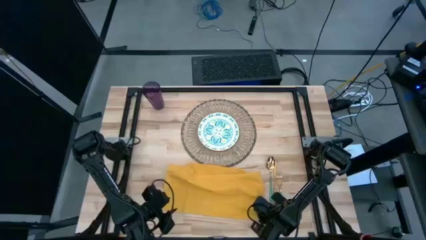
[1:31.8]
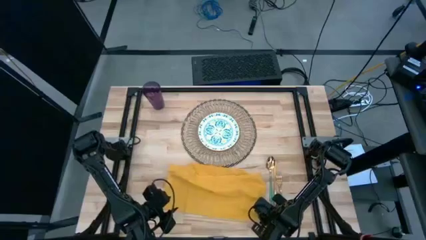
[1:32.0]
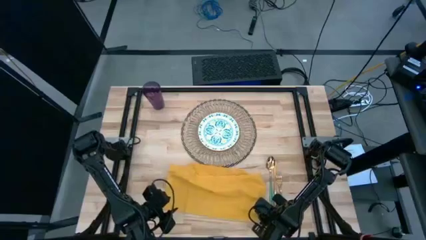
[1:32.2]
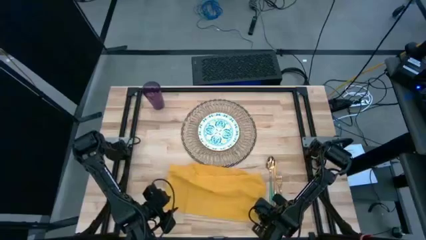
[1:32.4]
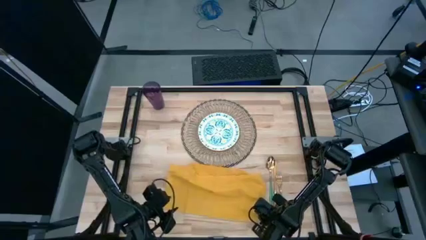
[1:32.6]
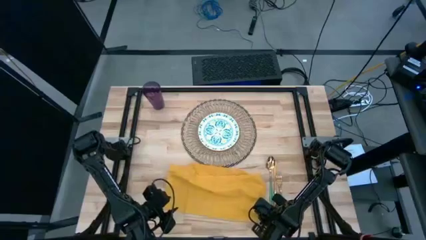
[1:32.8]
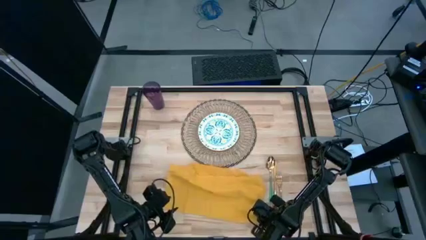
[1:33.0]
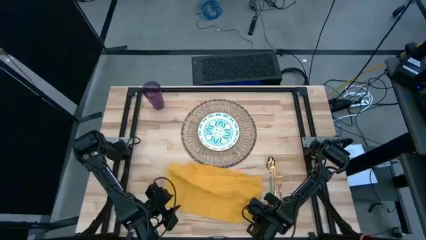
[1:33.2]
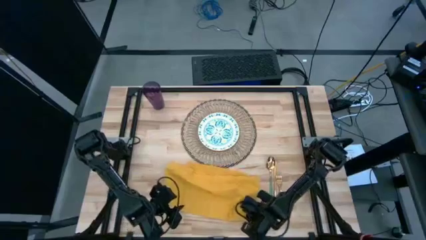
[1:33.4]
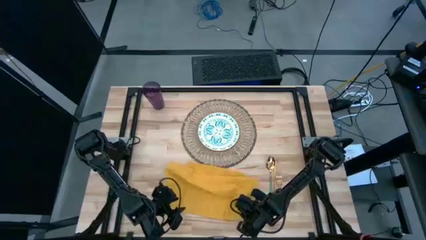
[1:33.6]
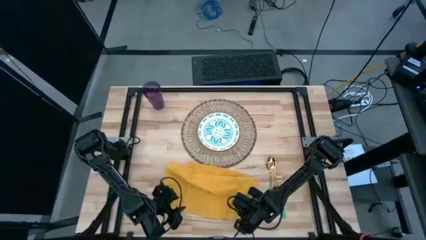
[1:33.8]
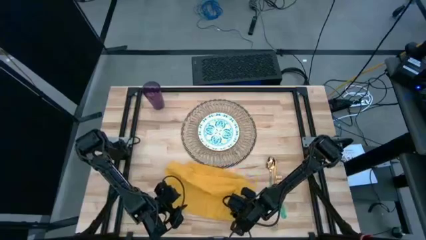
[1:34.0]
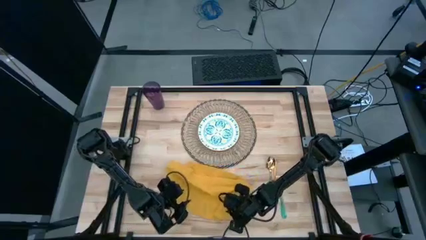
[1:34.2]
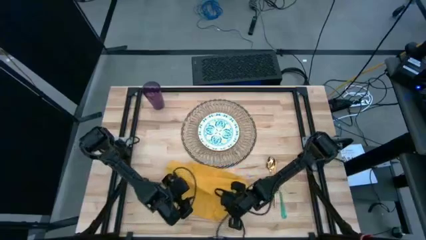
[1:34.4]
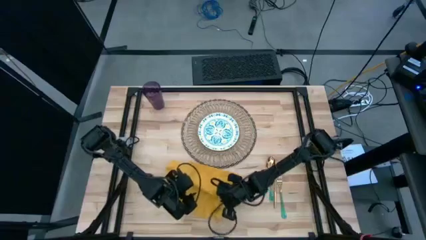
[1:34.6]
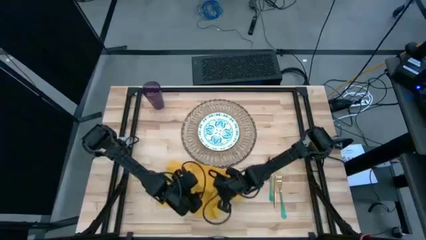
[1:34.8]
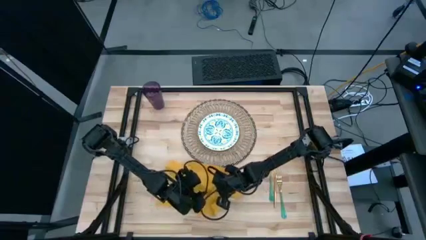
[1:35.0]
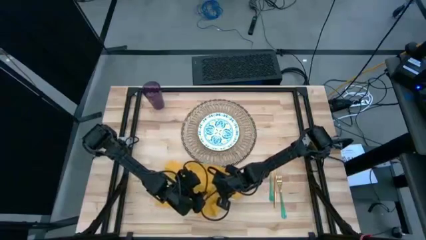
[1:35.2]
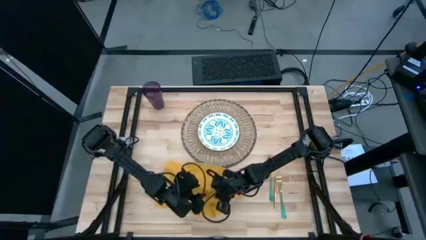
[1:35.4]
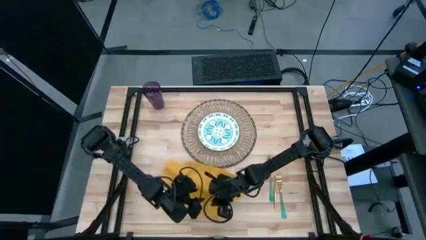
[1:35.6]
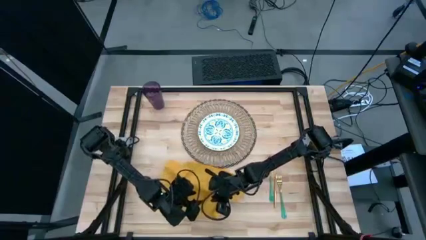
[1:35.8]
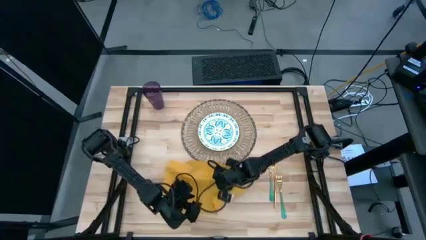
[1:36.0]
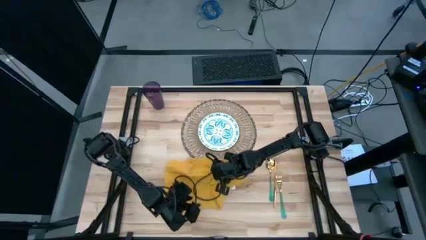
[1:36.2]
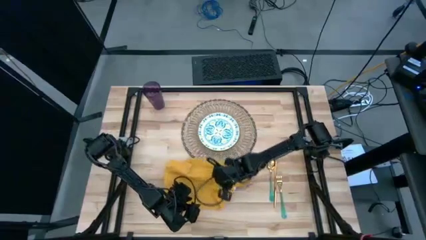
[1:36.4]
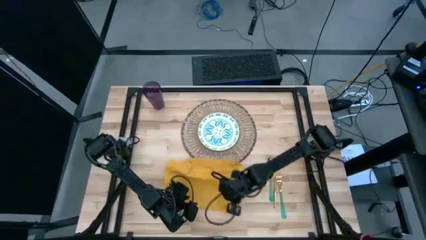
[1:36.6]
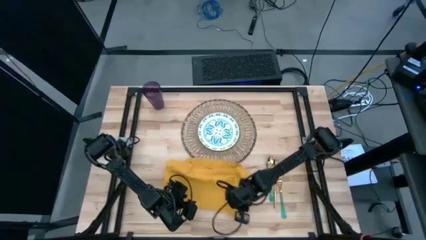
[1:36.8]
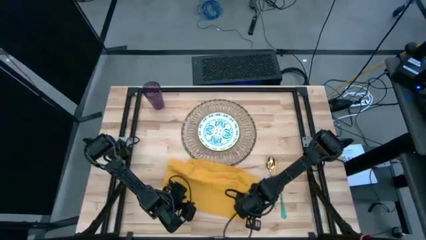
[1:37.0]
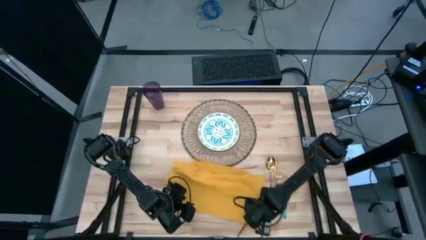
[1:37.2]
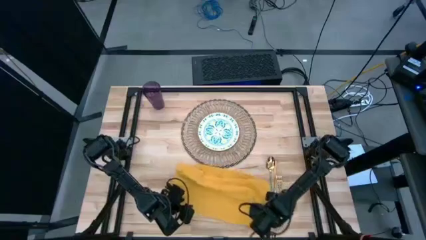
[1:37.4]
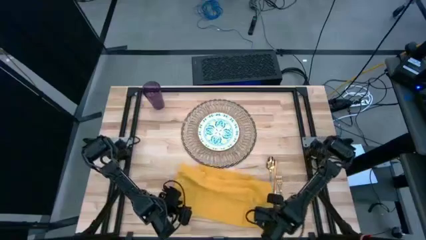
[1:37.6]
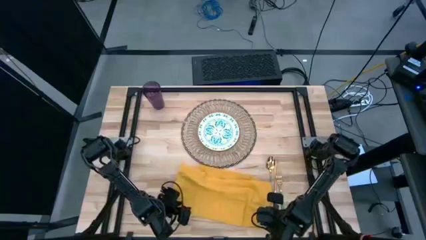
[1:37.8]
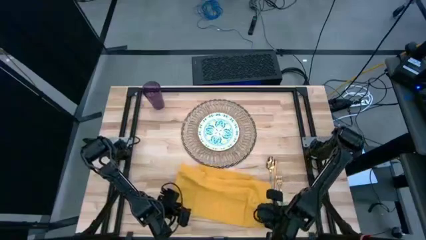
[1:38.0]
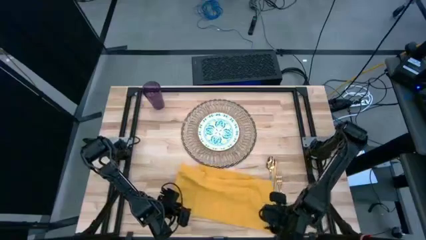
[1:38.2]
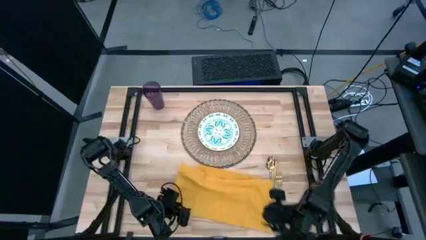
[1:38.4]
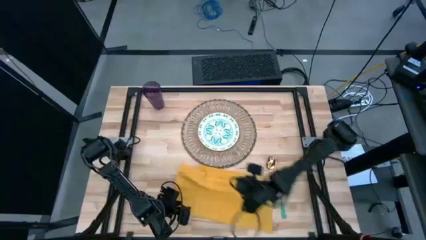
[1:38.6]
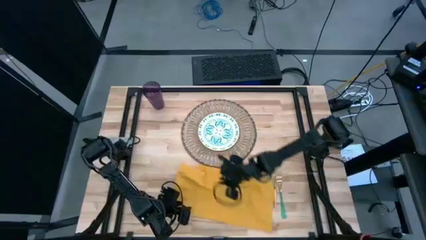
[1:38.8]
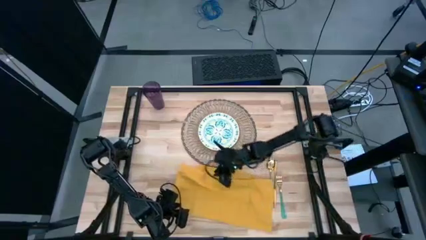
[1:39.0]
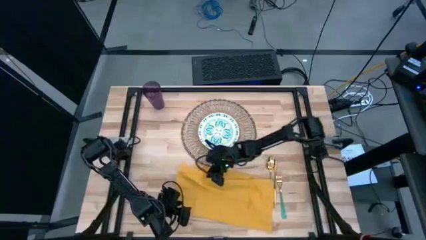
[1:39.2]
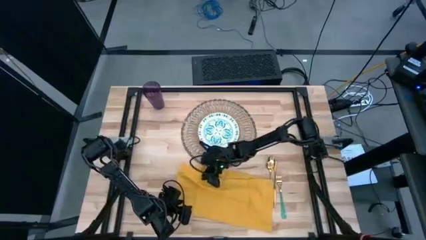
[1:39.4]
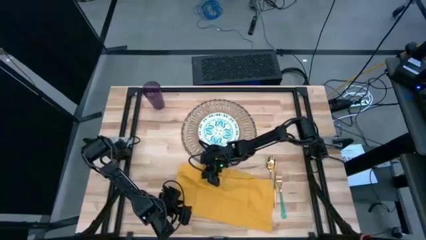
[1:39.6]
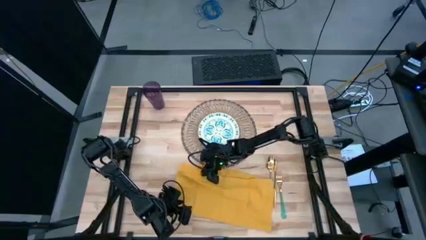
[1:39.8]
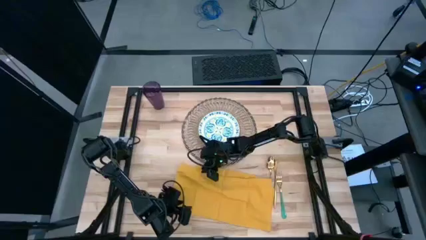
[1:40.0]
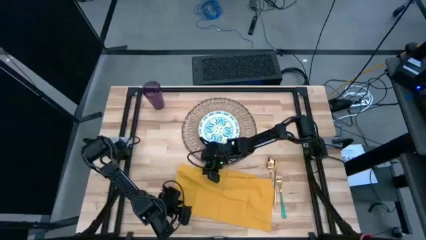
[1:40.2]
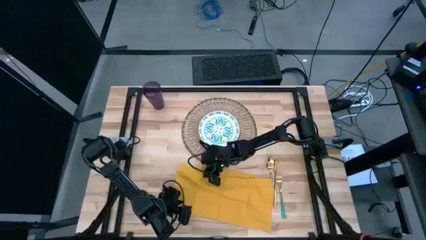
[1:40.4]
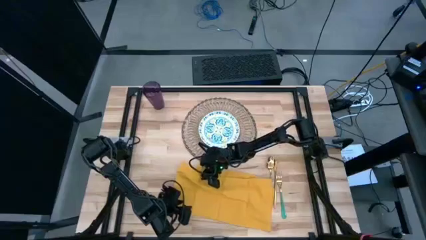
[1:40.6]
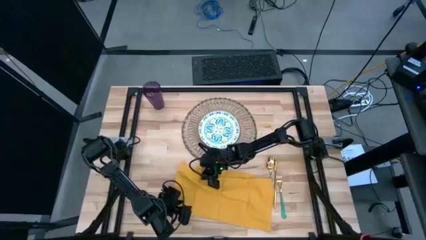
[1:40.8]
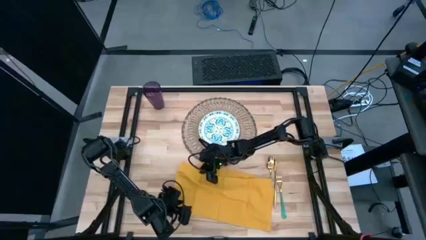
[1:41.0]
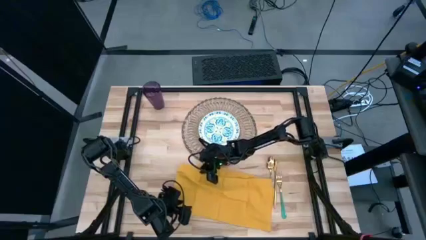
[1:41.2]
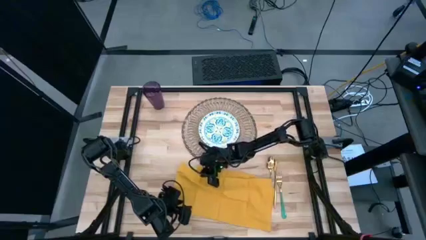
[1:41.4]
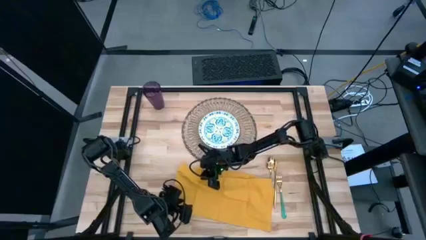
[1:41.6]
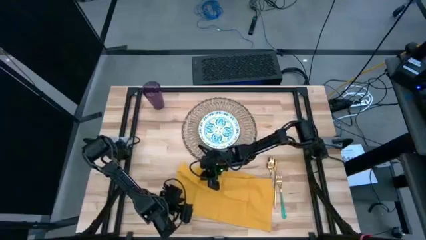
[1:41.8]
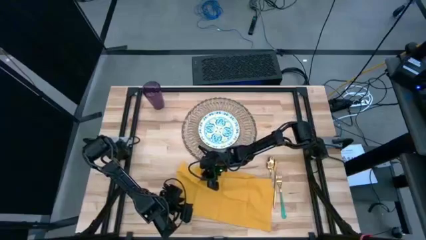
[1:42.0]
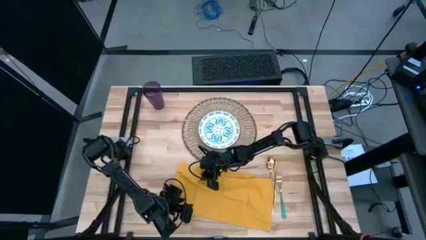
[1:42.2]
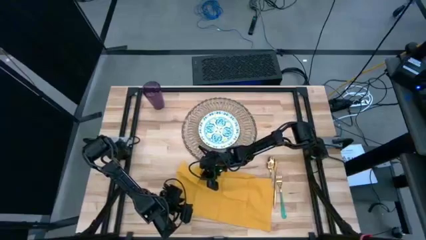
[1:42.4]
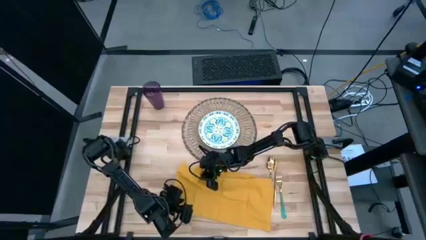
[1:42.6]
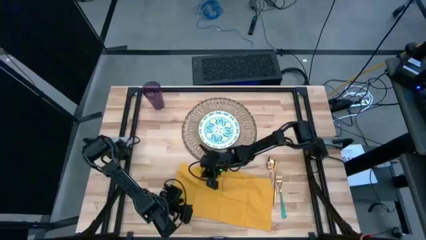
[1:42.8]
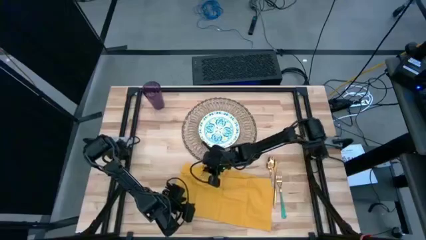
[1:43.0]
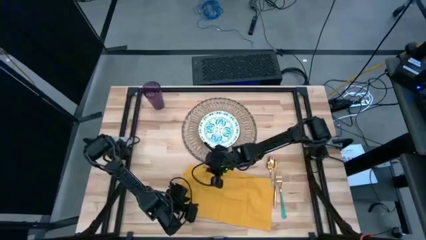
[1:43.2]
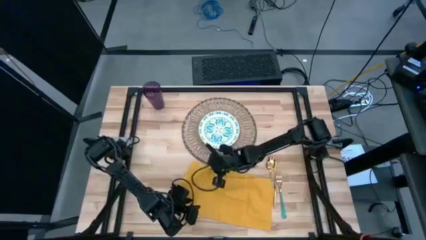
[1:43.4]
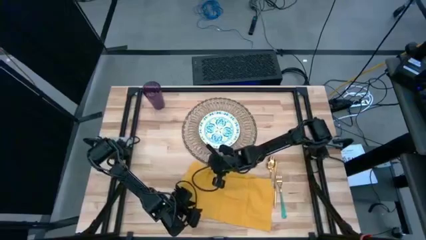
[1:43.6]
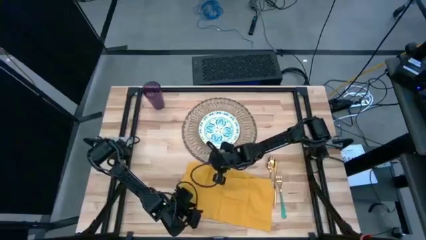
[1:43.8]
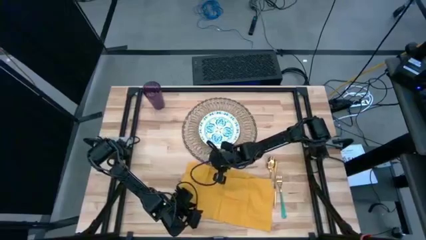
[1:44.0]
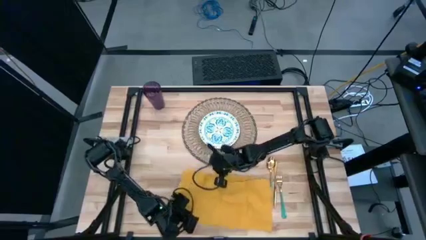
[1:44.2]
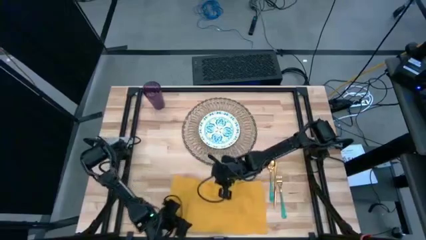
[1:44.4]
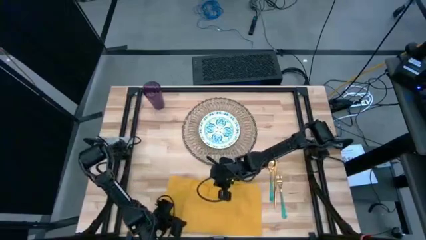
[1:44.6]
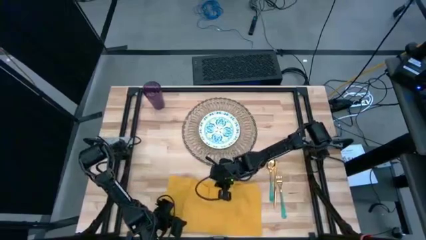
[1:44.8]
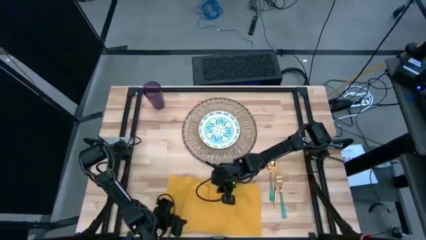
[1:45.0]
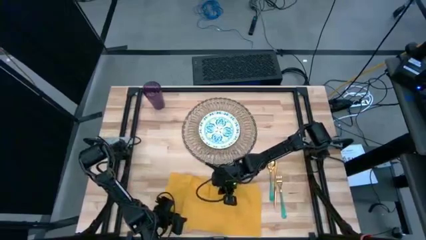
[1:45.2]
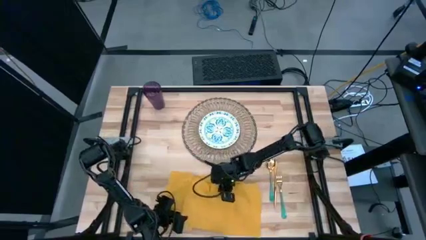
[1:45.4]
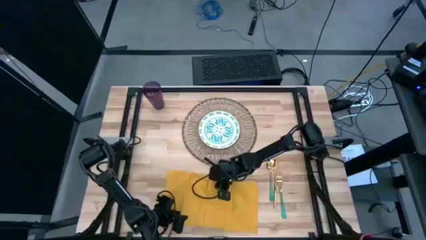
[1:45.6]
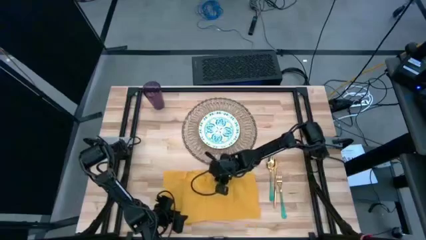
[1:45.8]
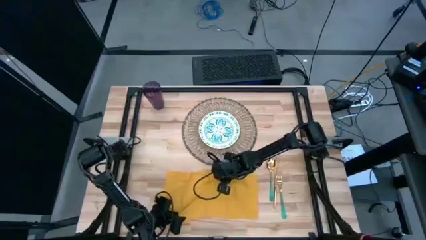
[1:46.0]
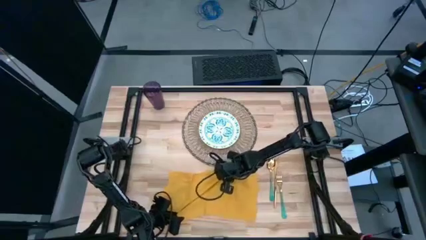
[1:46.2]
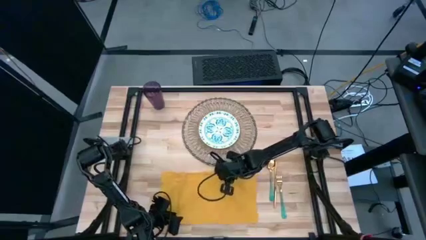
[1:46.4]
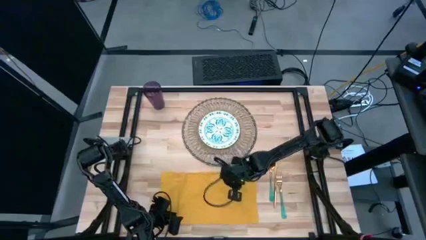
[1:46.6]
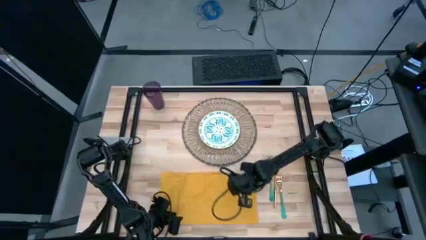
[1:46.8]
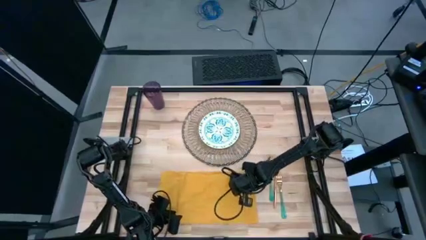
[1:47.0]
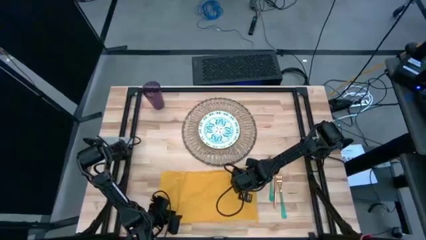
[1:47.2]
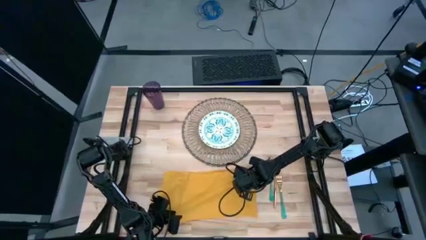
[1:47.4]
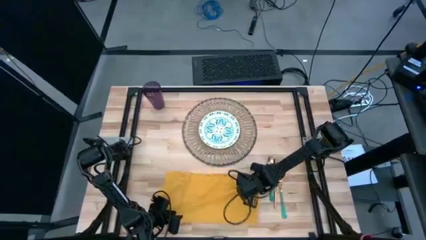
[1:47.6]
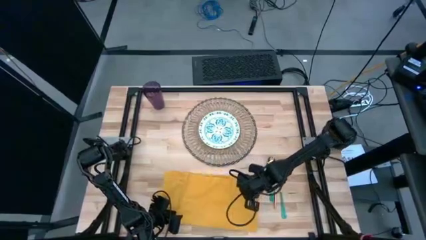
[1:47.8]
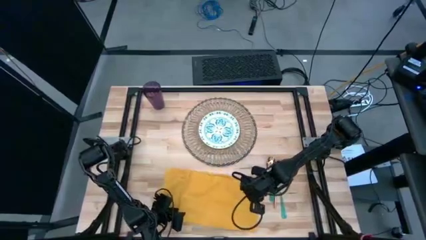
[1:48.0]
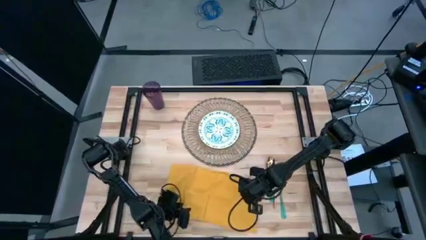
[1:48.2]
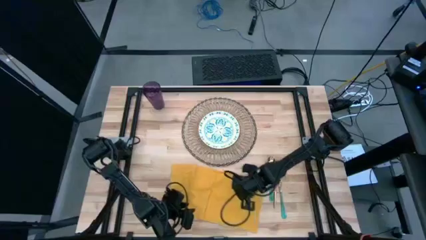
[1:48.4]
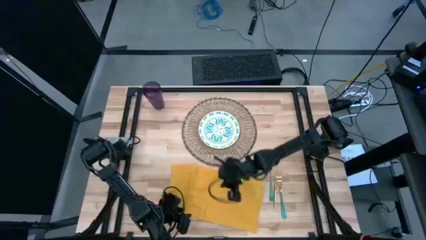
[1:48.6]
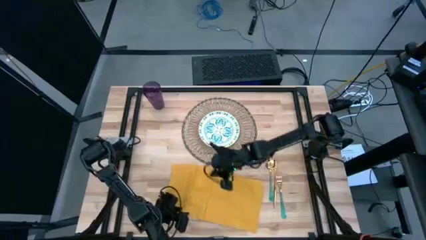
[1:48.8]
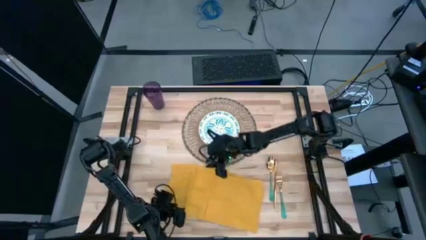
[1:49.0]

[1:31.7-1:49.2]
Task: Set table place
Fold the yellow table napkin
